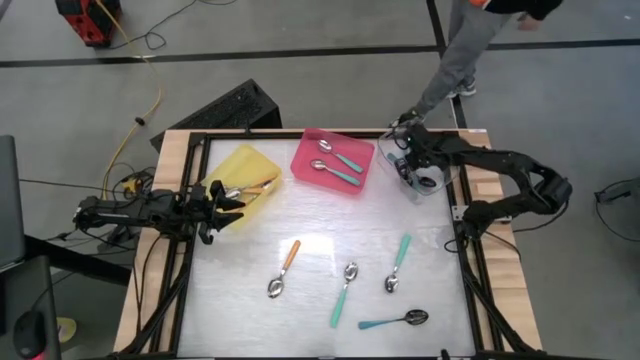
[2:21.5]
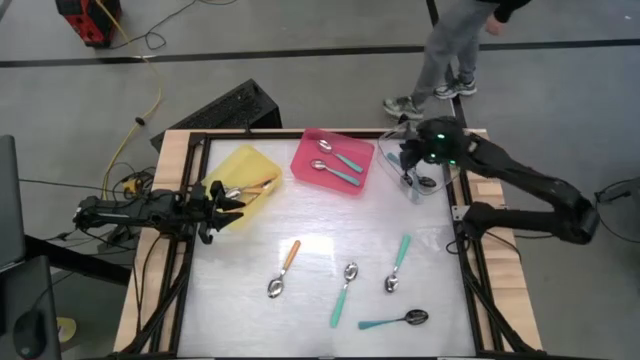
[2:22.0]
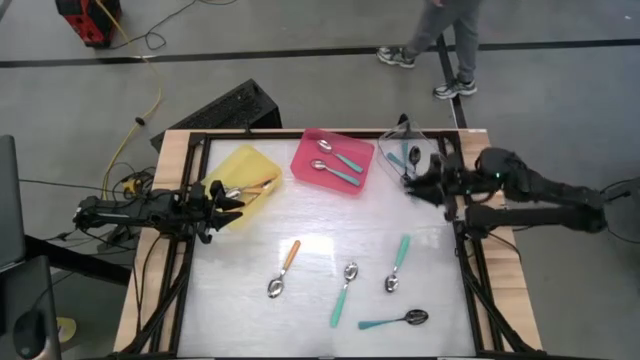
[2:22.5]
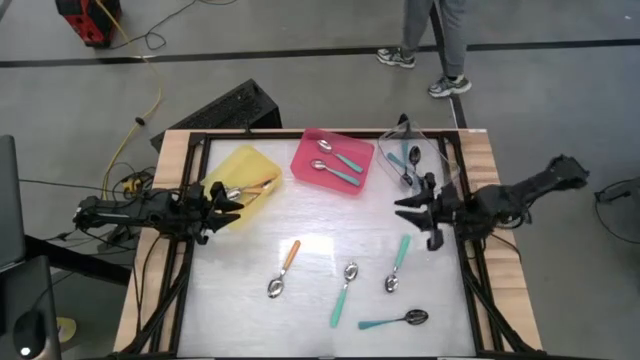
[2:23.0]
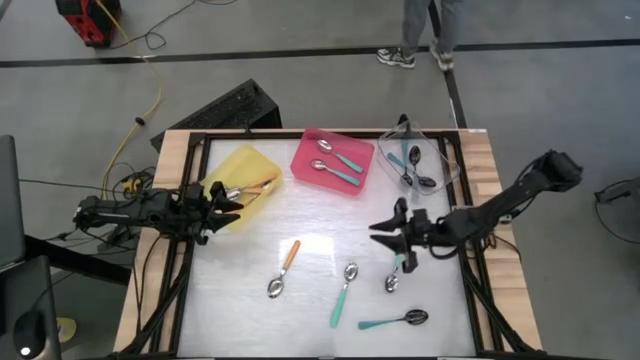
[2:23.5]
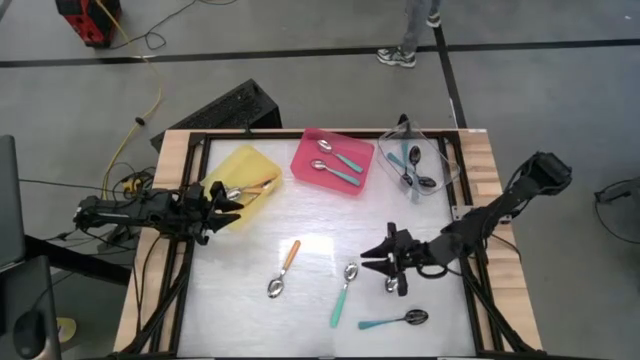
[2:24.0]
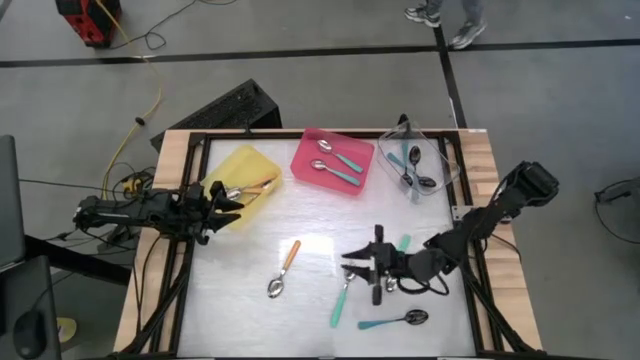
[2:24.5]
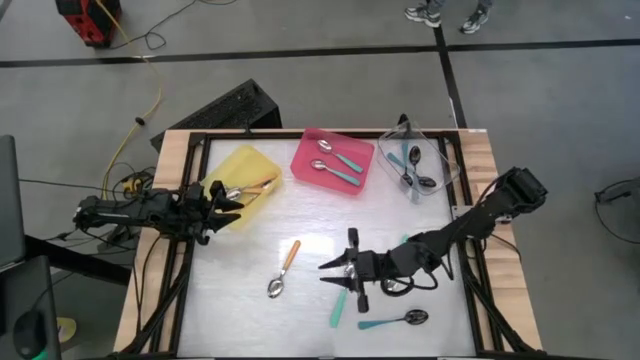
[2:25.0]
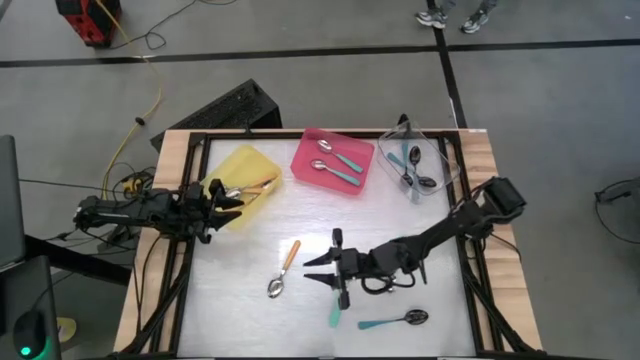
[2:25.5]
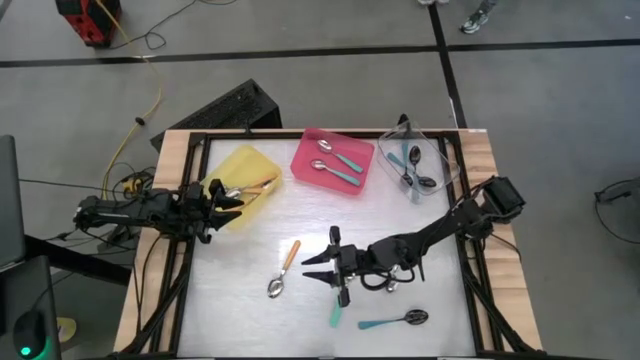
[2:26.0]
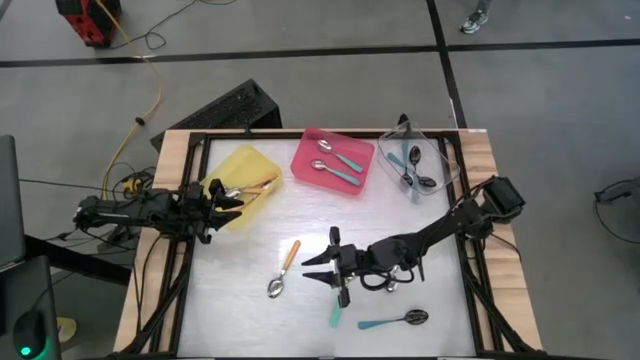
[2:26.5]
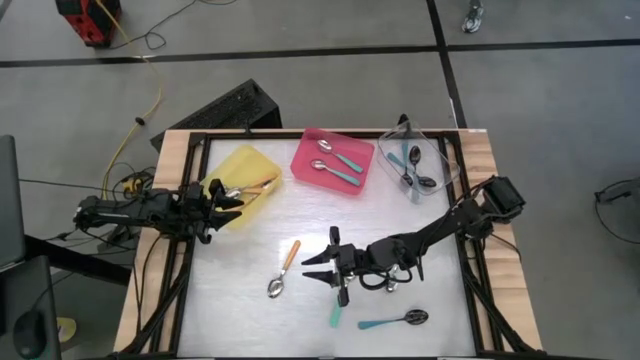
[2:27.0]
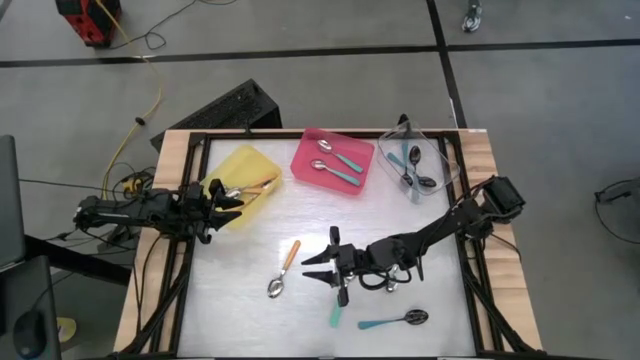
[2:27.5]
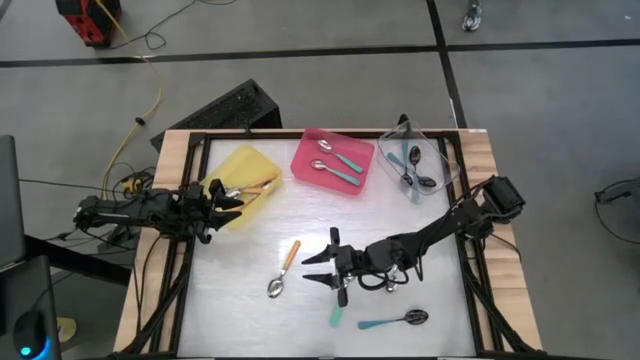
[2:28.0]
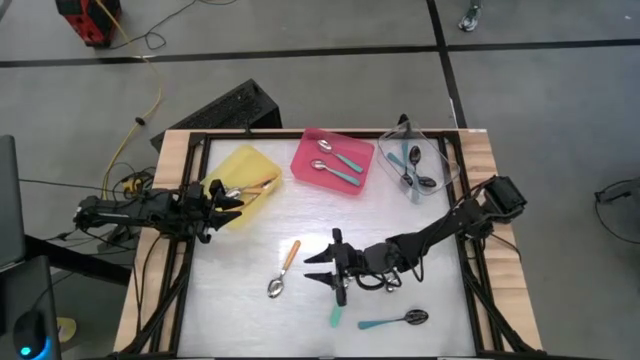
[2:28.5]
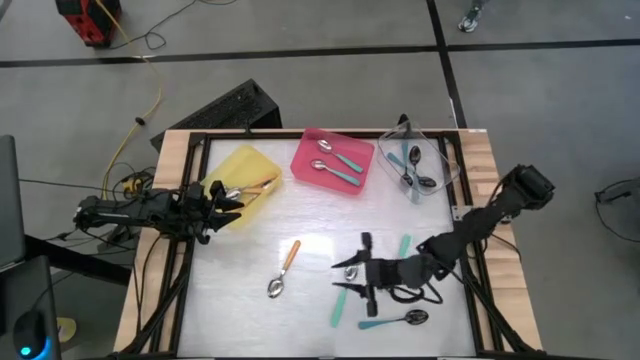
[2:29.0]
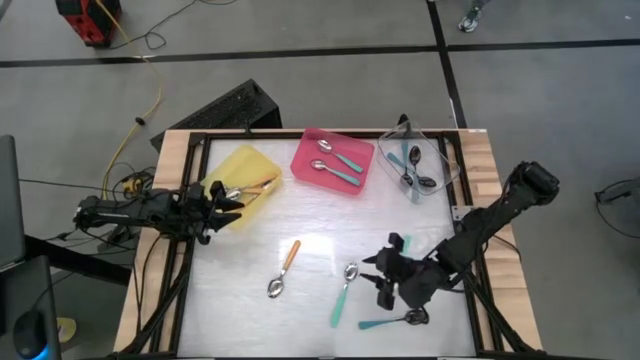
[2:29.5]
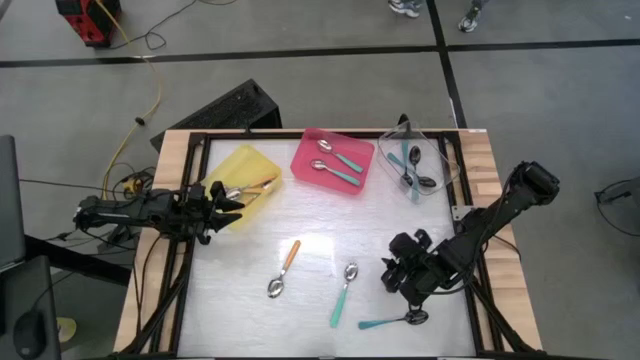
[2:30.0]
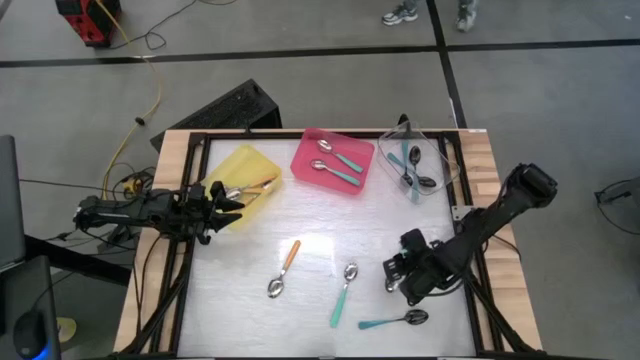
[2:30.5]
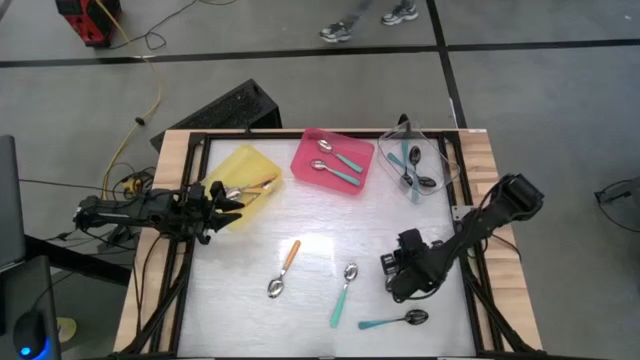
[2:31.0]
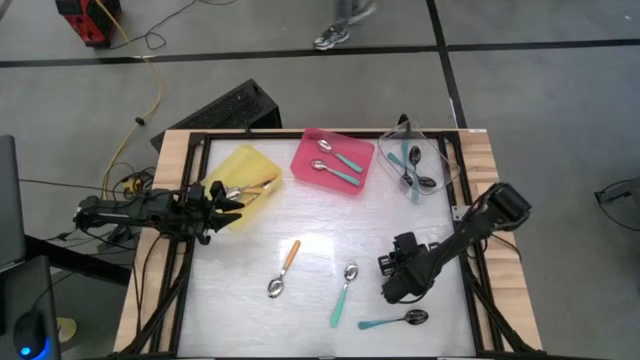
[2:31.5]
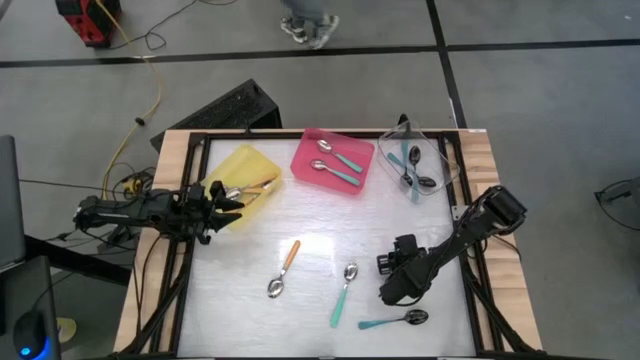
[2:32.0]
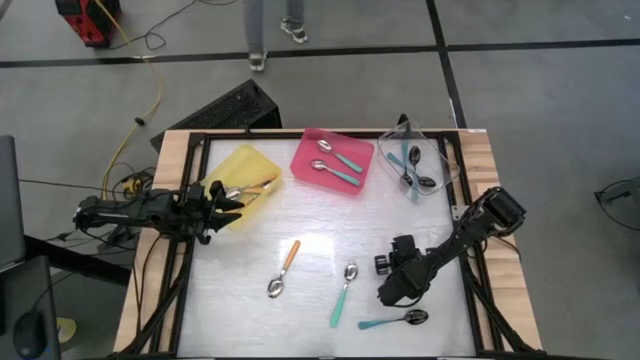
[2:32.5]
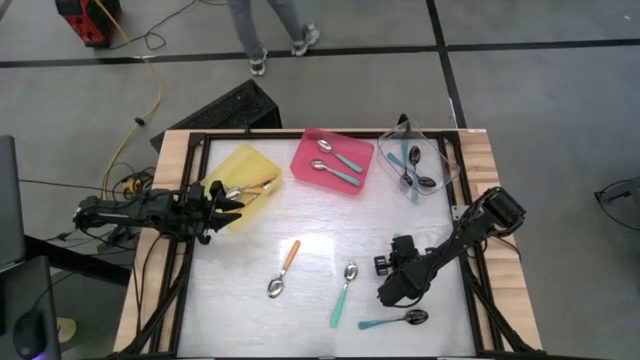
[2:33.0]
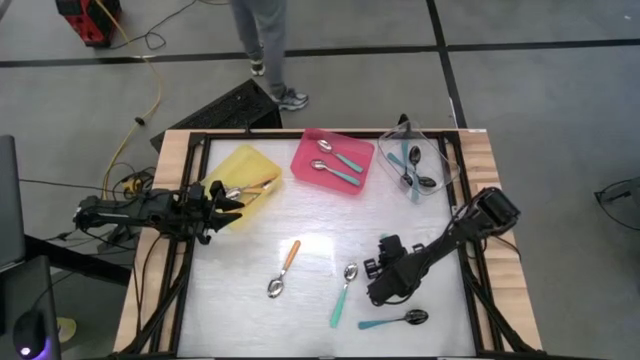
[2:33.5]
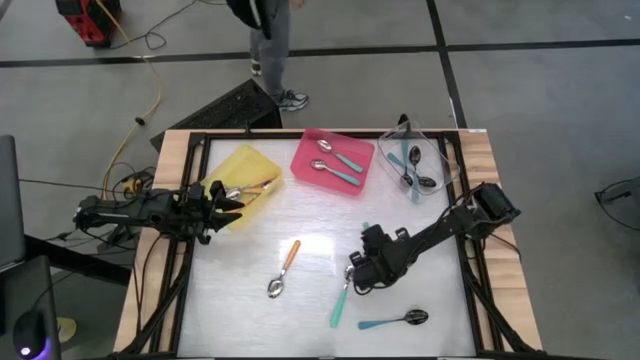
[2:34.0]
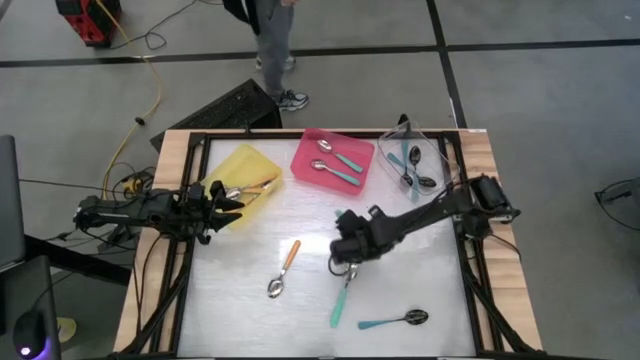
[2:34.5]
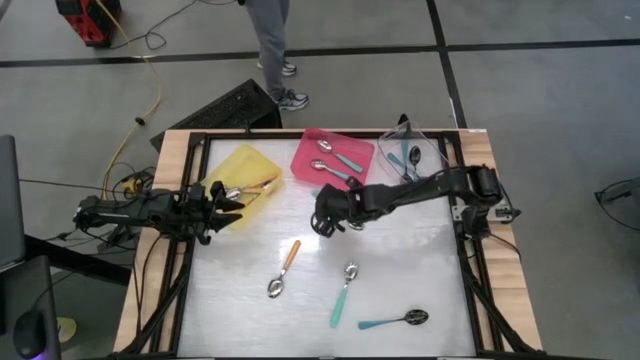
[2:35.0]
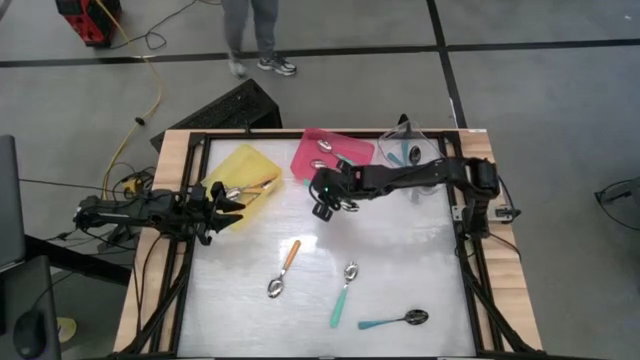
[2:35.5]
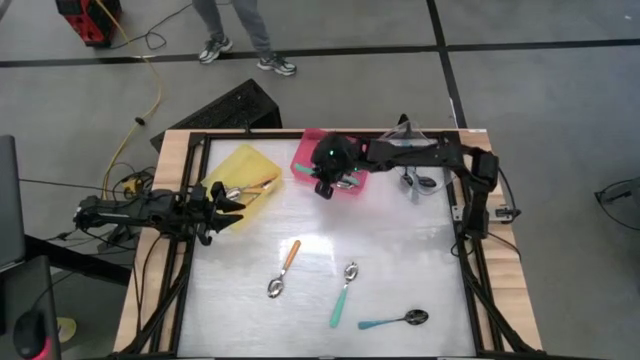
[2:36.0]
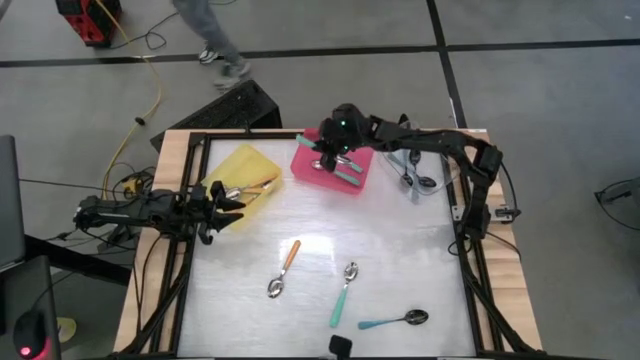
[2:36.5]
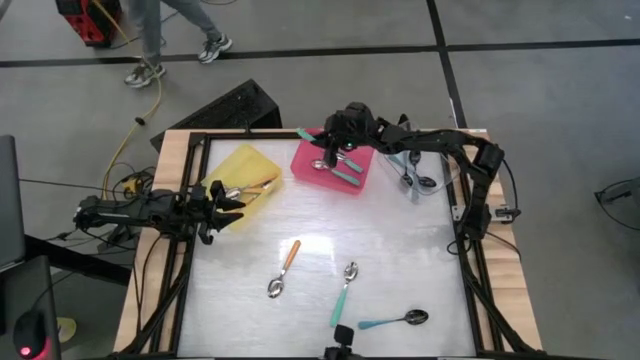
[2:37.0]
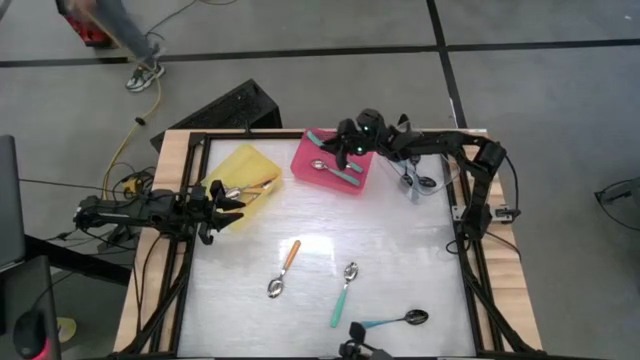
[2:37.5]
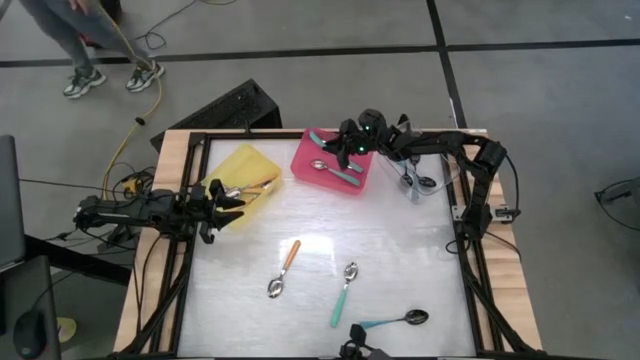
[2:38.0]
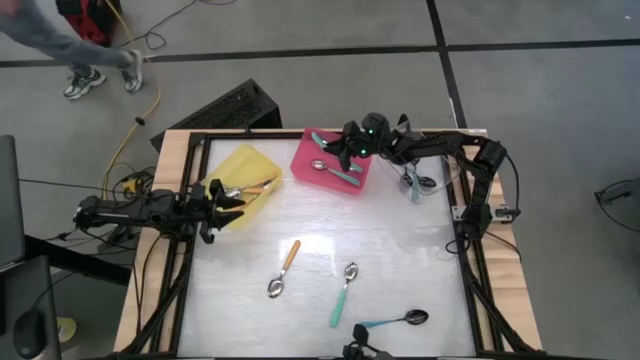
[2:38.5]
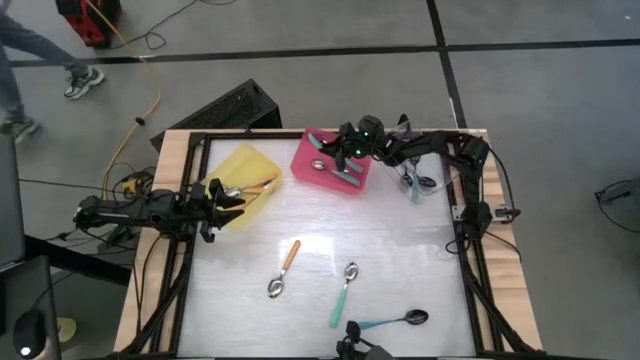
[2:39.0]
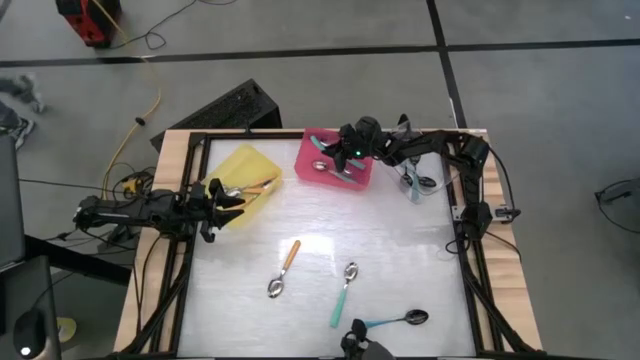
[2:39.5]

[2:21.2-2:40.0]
Task: Sort silverware by color (type)
Put the green spoon into the red bin

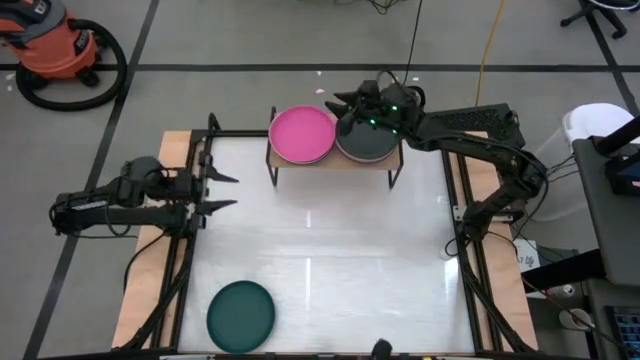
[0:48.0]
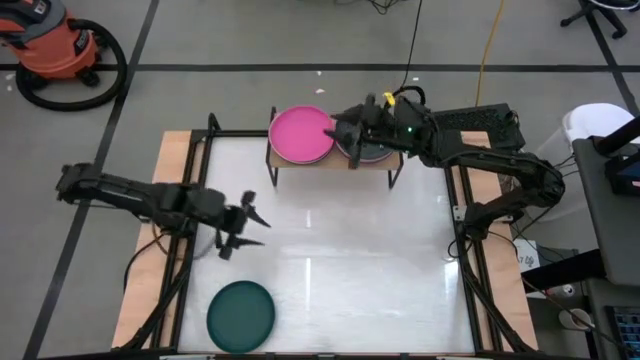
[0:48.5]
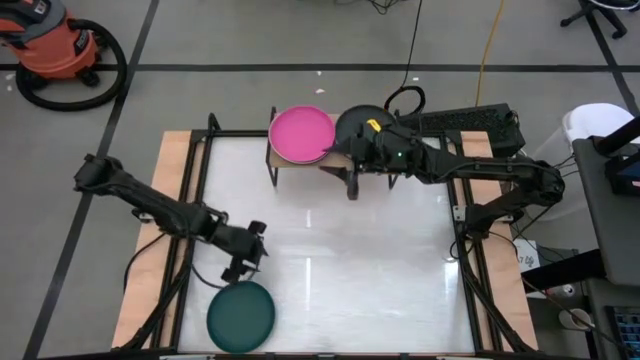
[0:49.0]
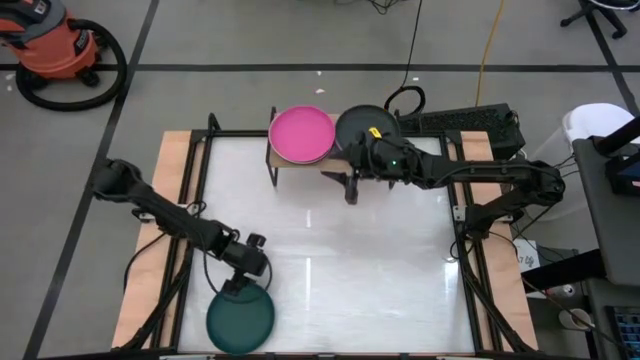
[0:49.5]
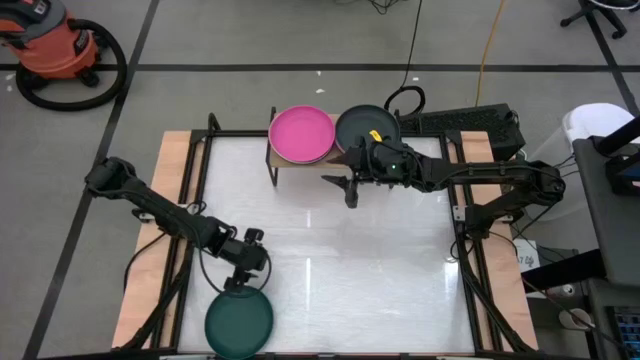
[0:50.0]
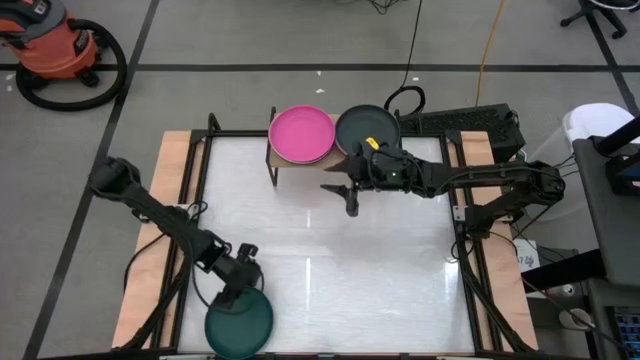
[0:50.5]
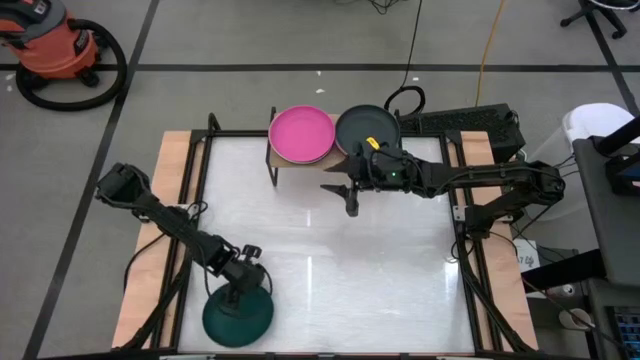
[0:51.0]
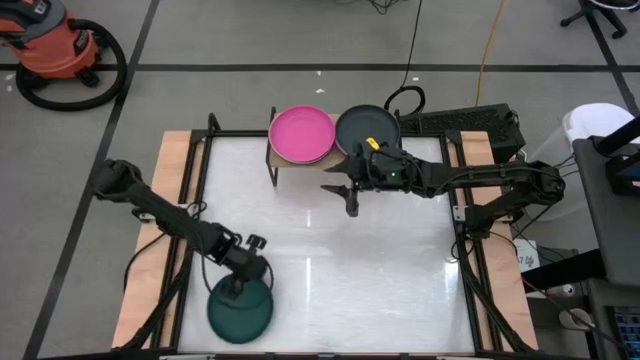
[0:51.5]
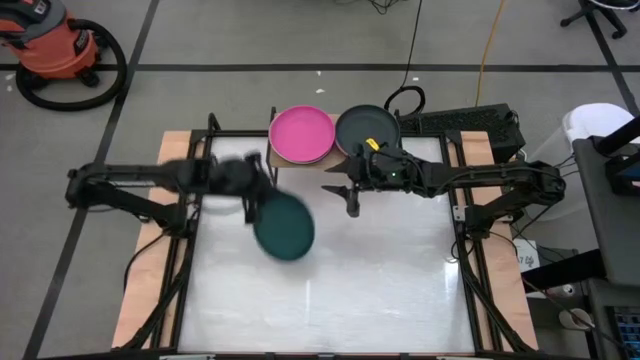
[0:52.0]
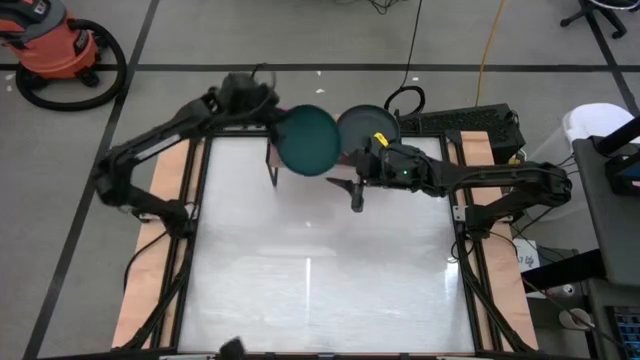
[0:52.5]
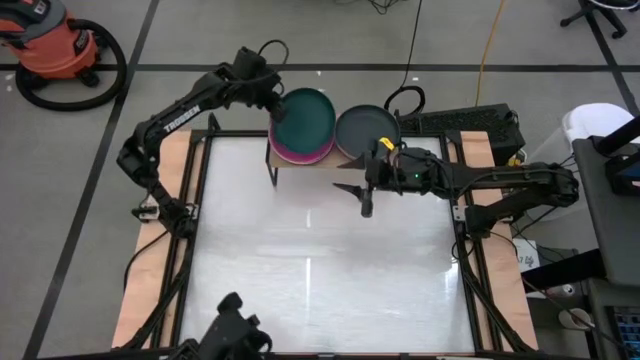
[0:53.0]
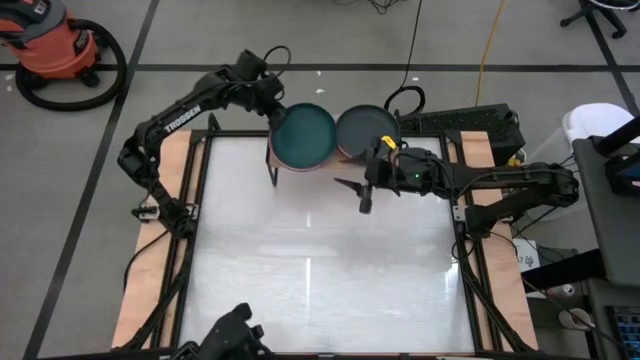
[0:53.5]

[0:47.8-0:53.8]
Task: Place and stack plates onto a shelf
Stack the dark green plate on top of the pink plate on the shelf
